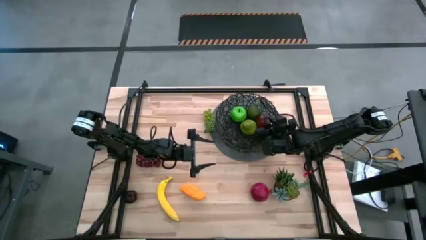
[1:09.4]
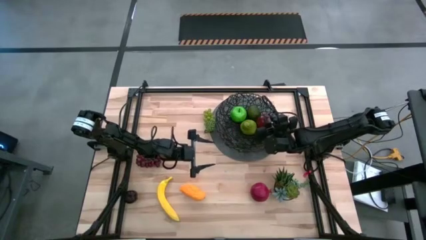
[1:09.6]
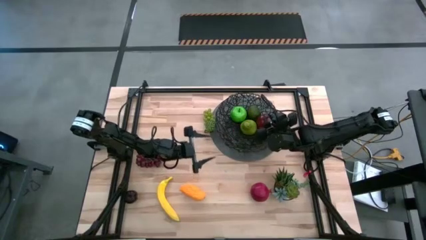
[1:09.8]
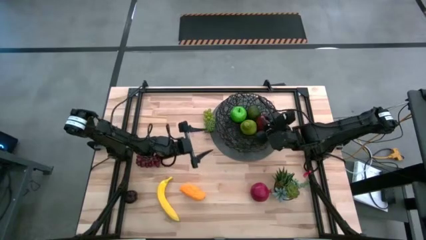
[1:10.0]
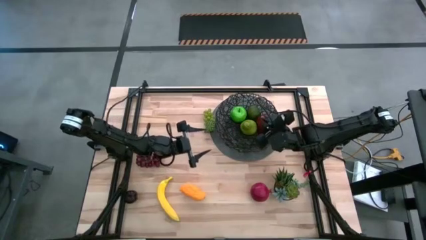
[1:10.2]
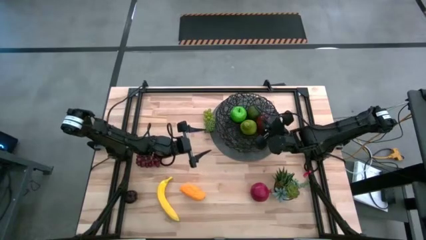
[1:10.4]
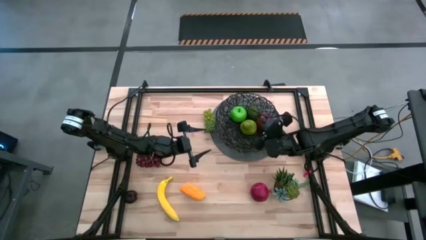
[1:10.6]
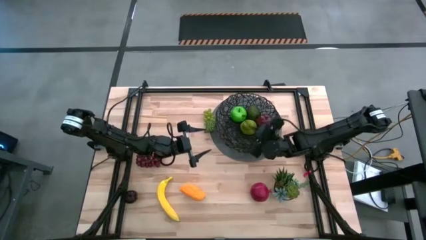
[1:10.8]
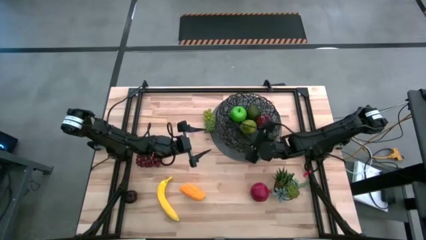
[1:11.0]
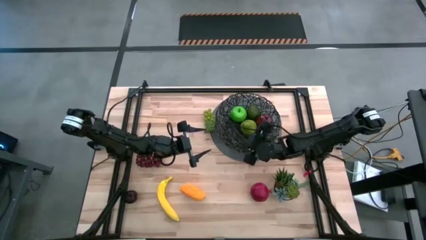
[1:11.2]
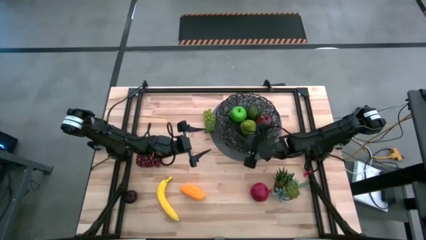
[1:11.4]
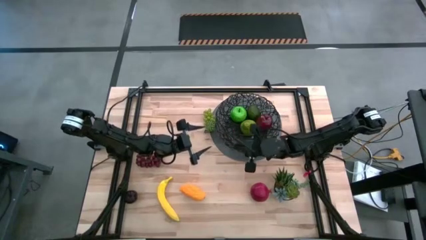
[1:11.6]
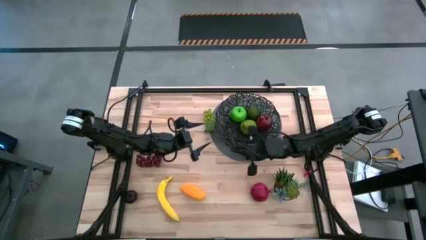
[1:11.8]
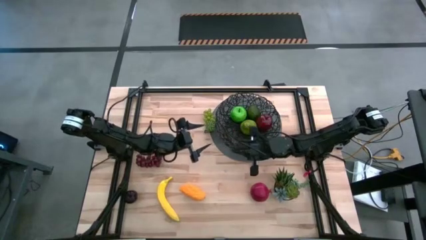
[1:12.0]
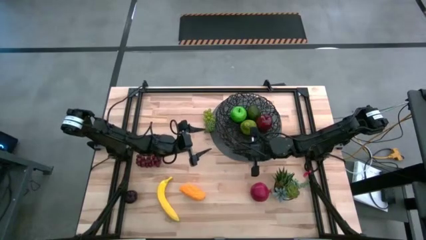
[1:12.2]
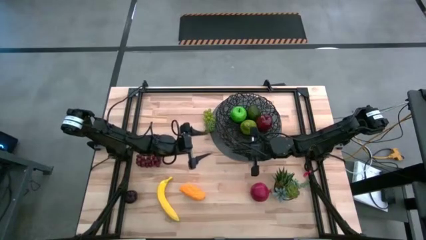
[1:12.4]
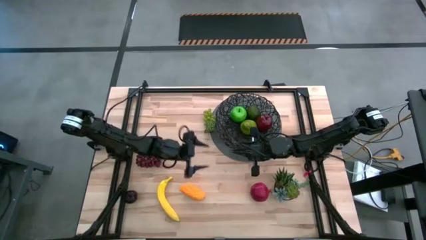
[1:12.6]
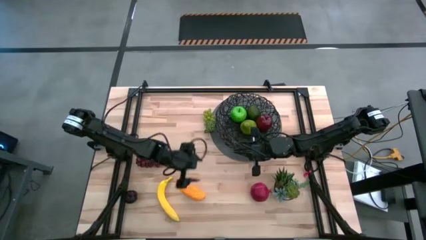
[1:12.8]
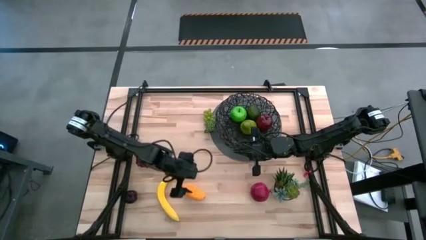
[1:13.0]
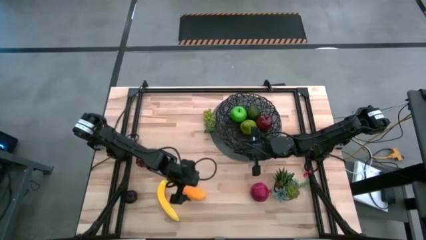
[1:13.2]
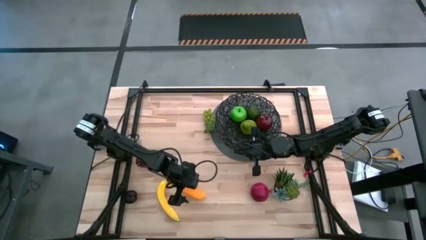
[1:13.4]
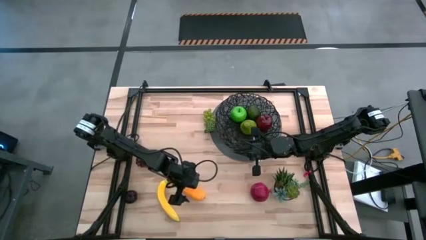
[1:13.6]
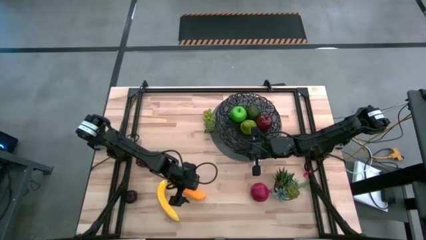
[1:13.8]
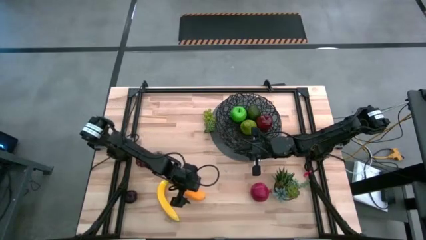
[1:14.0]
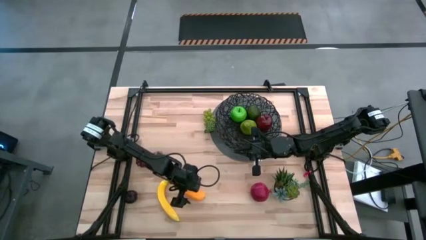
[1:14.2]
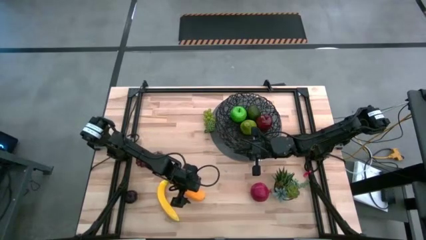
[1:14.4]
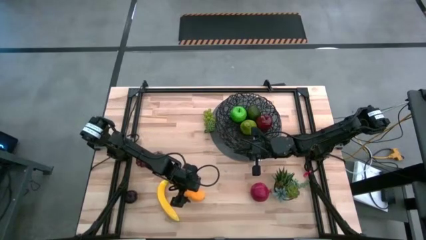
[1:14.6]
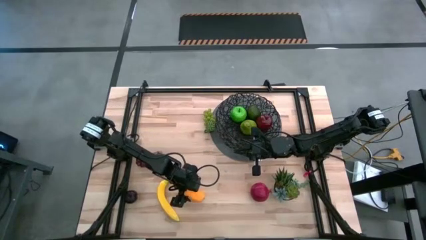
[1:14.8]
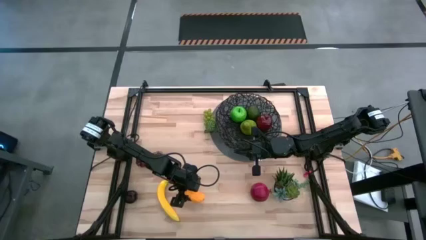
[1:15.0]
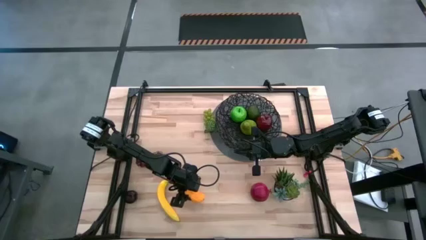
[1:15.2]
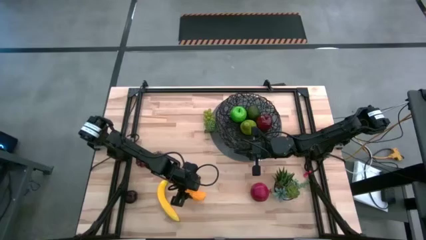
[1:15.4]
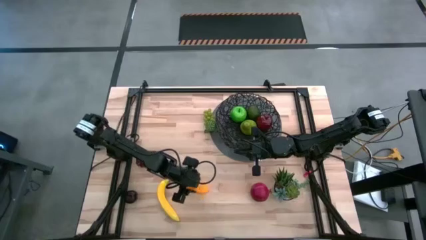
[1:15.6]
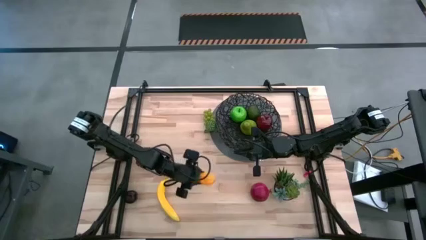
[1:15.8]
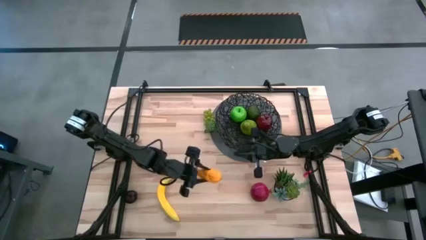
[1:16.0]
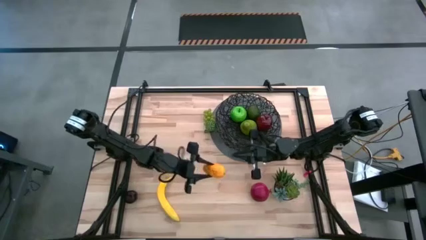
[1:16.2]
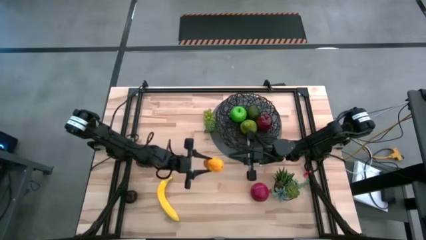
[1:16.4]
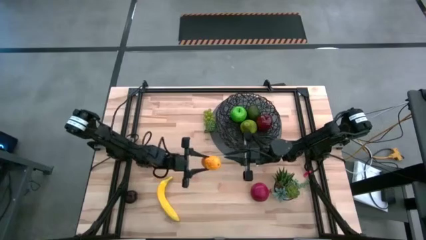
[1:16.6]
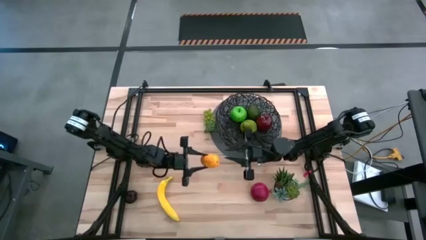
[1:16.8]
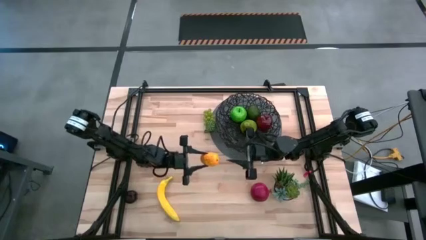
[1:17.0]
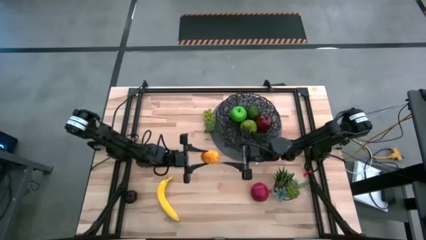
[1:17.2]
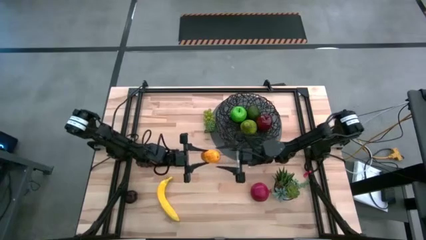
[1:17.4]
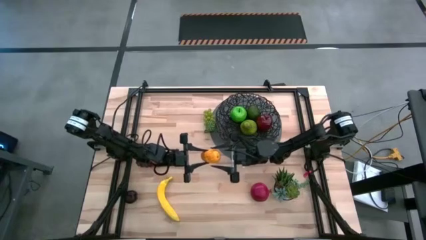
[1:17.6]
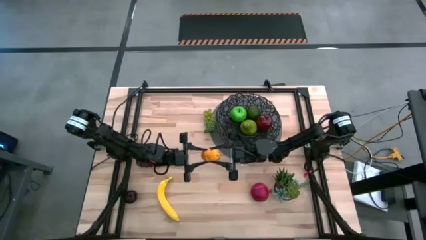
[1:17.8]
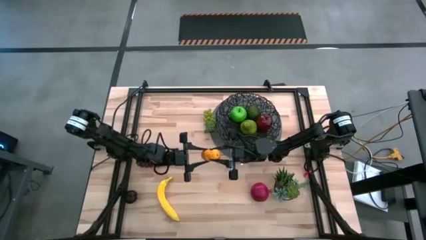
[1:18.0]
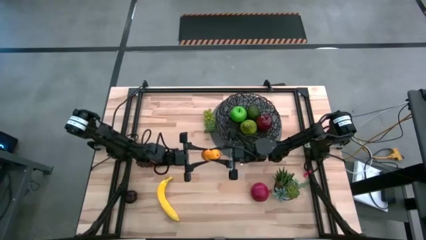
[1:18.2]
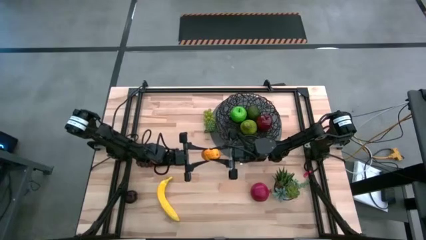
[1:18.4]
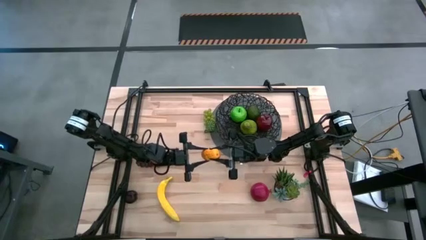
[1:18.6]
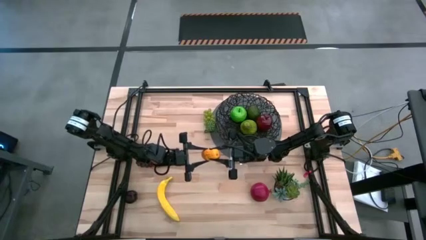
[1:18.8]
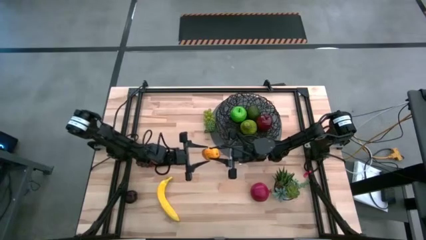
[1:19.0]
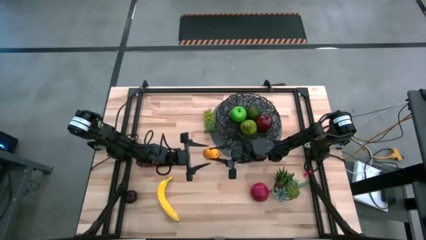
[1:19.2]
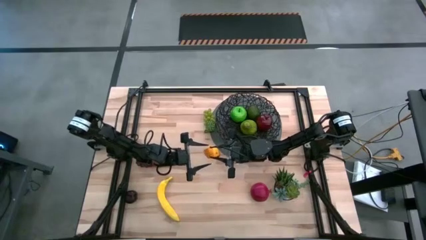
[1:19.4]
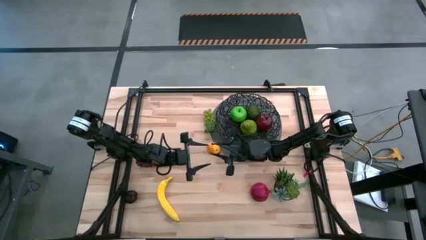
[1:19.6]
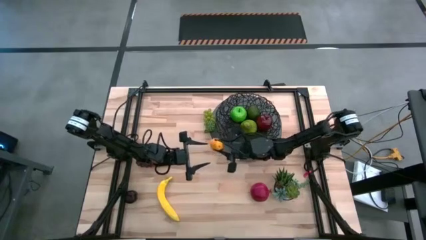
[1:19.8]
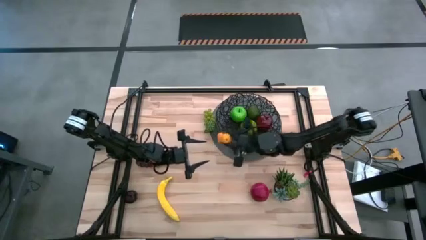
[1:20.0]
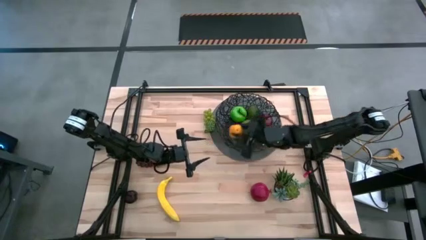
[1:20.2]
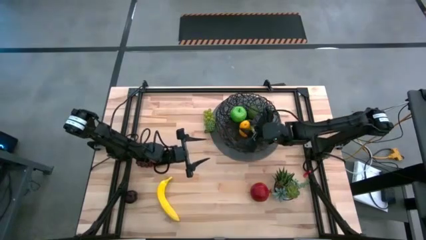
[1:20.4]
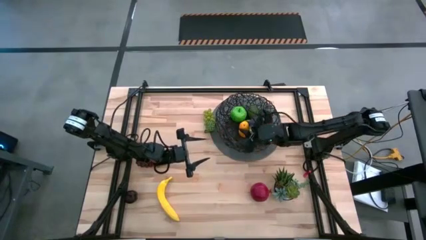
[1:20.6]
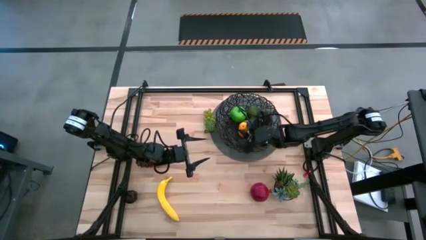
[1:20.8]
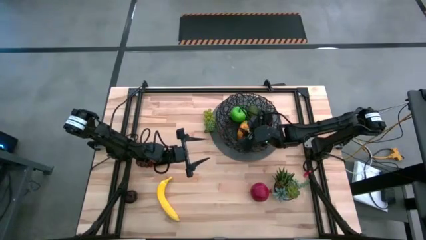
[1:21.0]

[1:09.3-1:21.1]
Task: Build produce basket
Put the mango into the wire basket

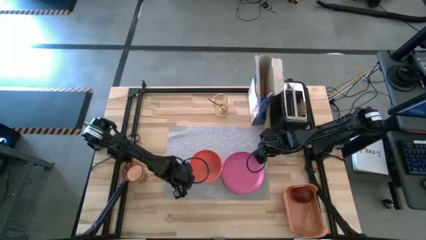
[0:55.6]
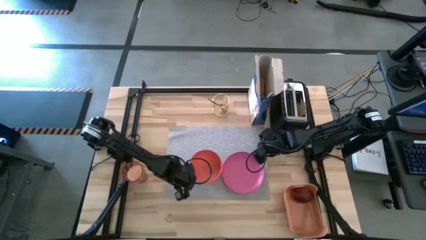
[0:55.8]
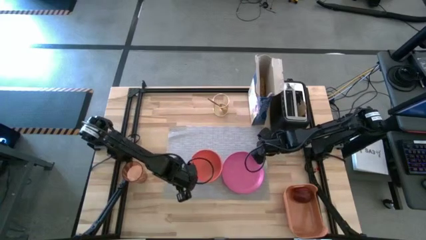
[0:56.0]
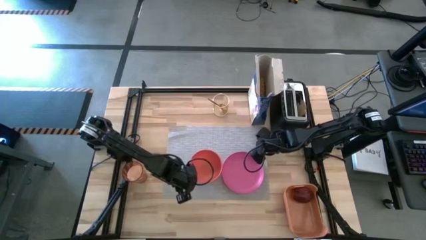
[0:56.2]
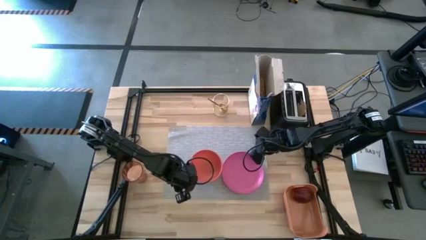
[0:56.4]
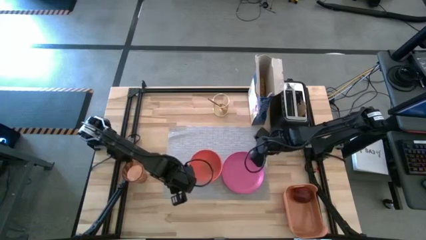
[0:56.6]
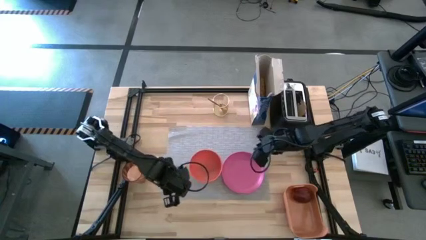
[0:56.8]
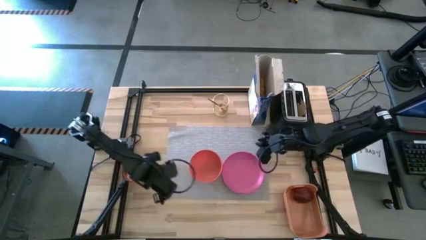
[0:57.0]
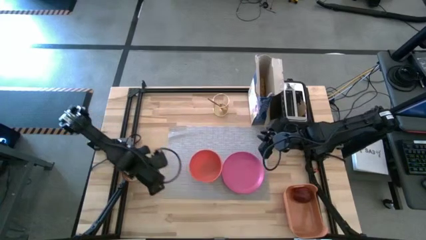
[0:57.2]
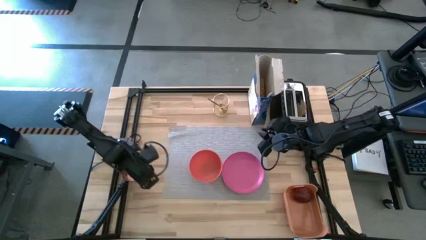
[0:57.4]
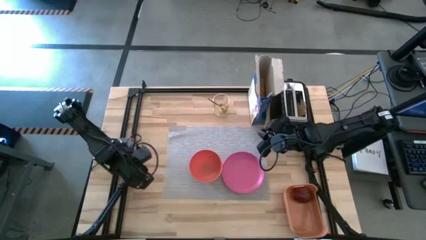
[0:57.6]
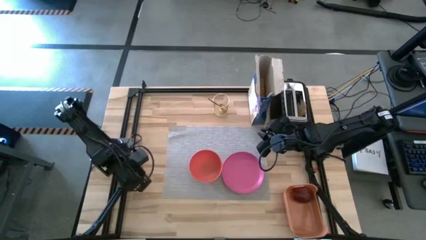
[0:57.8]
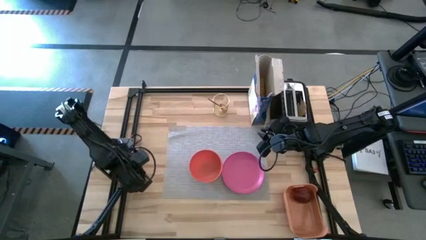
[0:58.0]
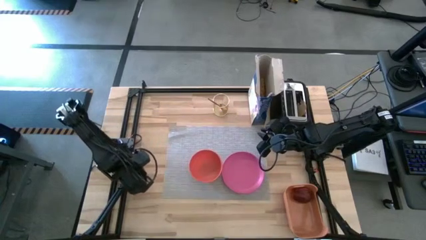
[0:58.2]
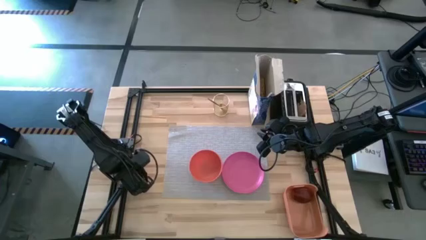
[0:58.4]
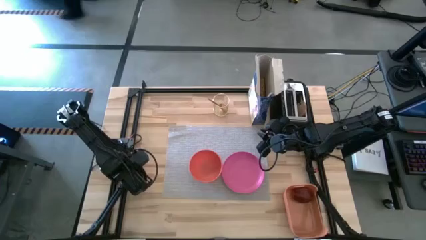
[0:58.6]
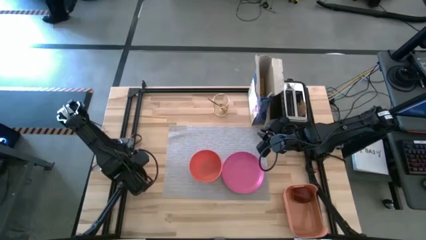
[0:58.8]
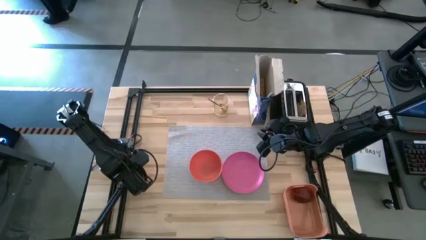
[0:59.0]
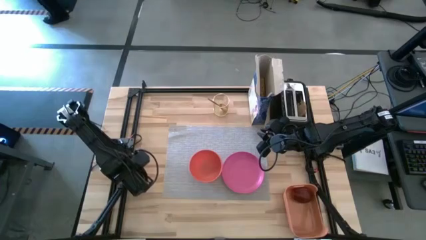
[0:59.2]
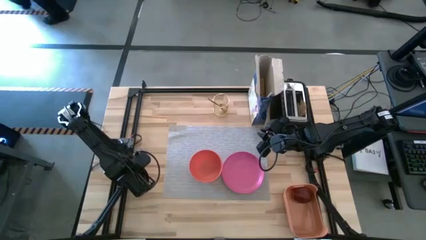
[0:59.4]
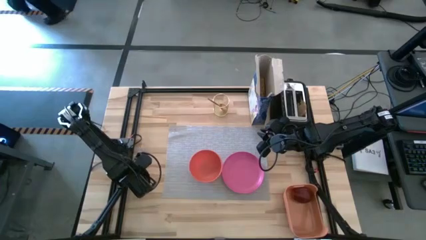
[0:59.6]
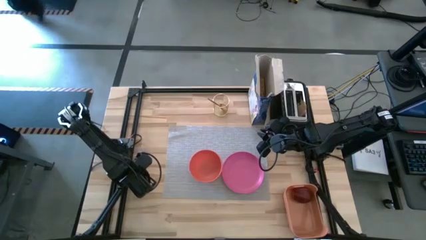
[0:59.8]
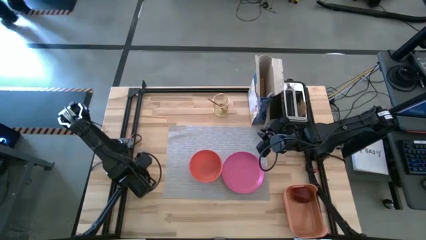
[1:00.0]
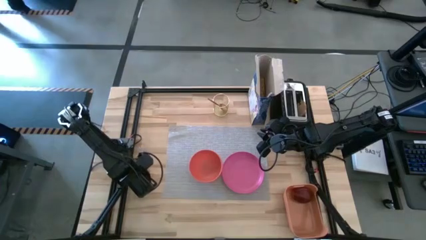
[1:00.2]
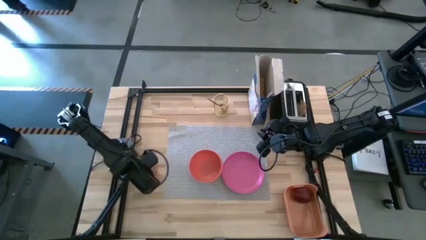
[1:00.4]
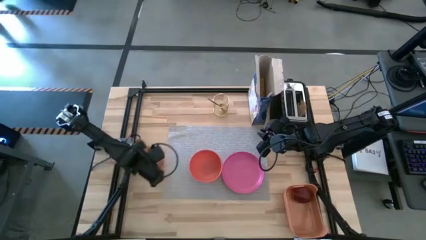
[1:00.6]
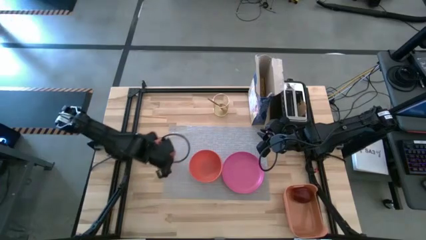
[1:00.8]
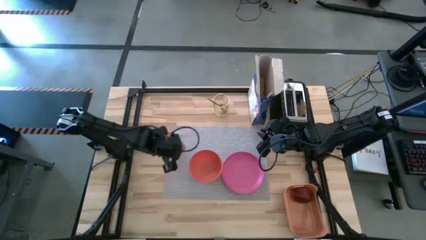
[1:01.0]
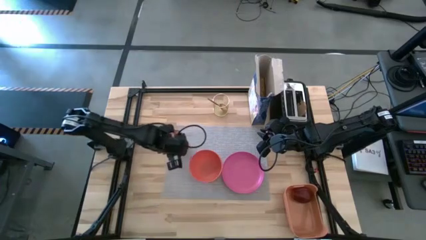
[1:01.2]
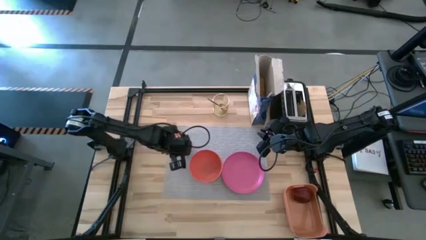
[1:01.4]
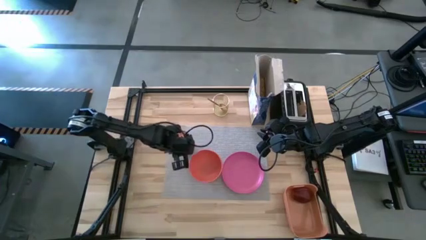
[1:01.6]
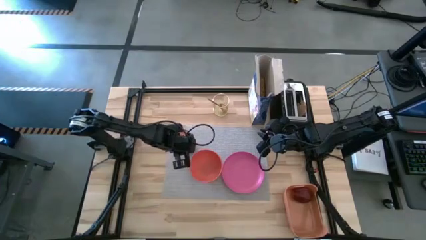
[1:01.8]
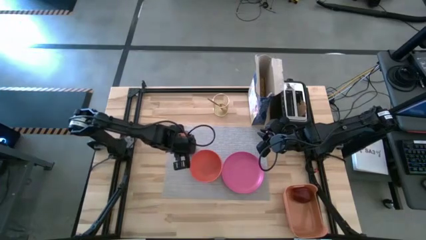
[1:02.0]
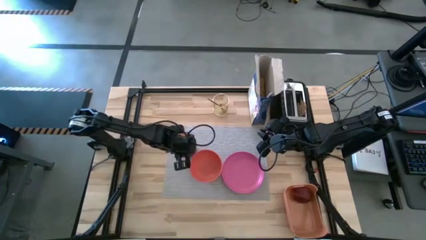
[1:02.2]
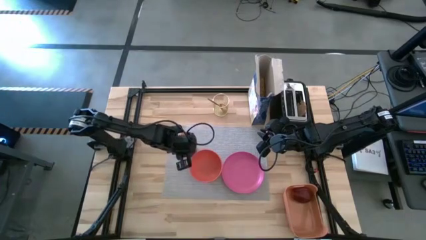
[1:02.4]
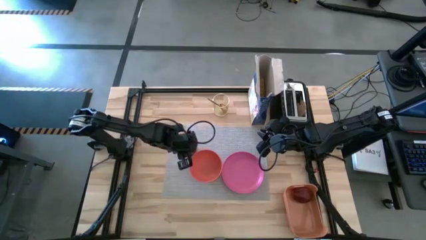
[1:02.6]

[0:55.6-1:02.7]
Task: Arrange a breakfast setting
Put the orange cup to the top right of the orange bowl on the gray table mat
